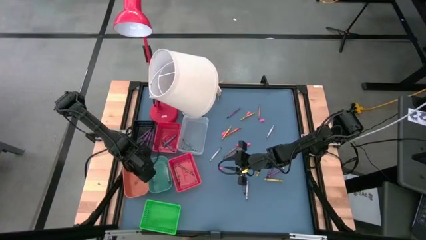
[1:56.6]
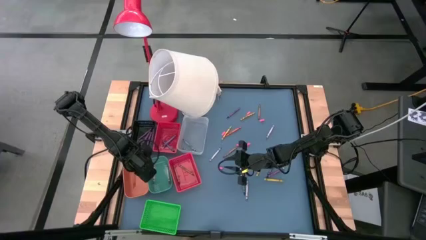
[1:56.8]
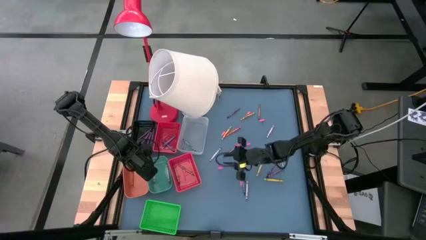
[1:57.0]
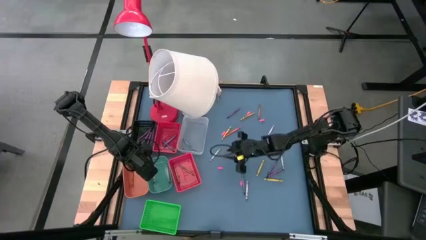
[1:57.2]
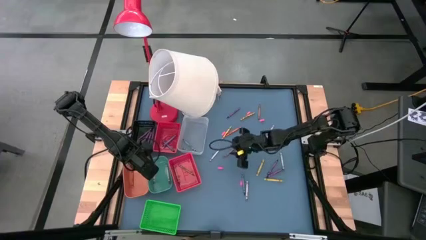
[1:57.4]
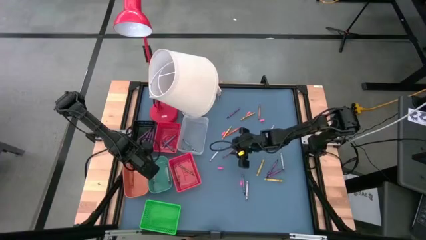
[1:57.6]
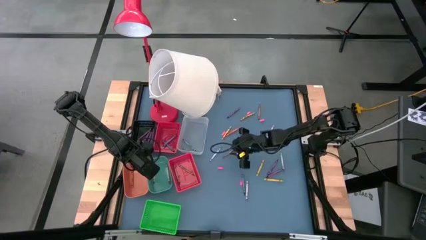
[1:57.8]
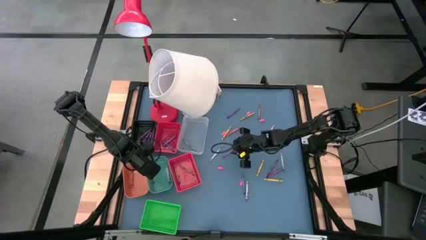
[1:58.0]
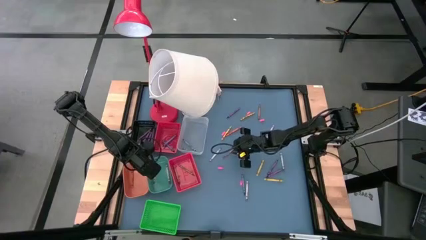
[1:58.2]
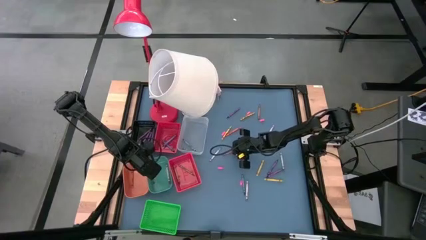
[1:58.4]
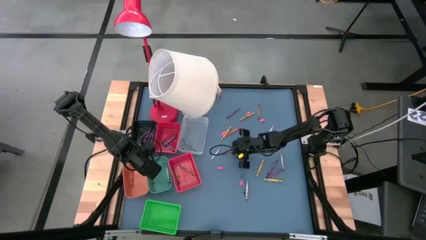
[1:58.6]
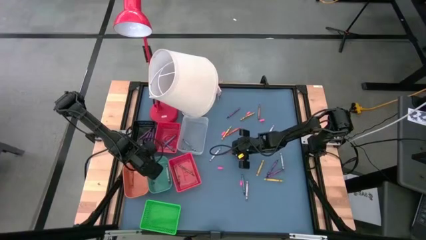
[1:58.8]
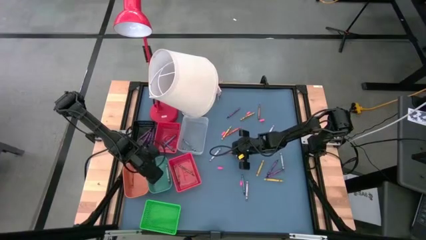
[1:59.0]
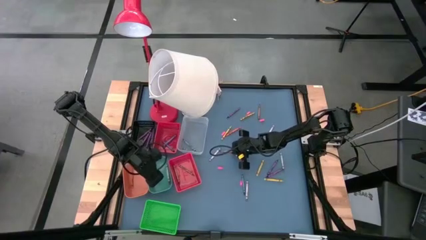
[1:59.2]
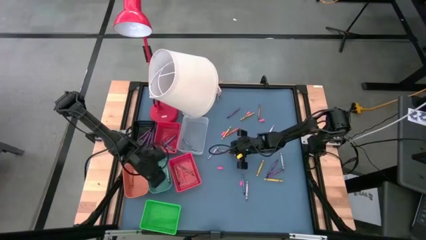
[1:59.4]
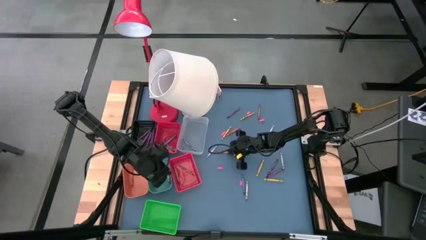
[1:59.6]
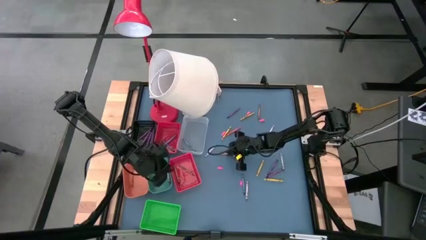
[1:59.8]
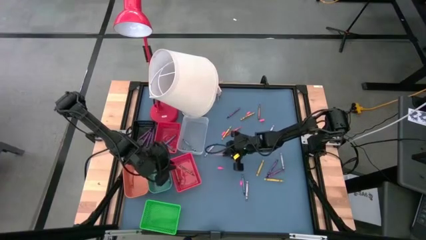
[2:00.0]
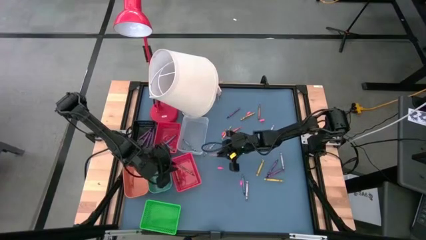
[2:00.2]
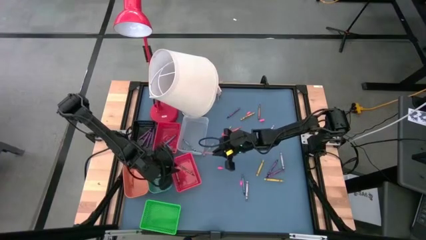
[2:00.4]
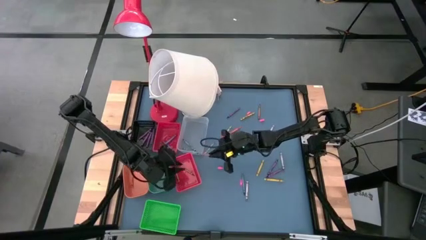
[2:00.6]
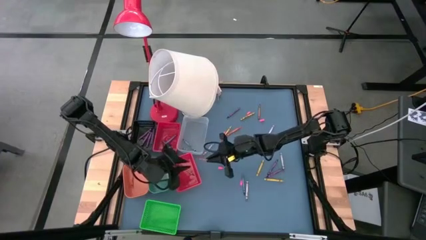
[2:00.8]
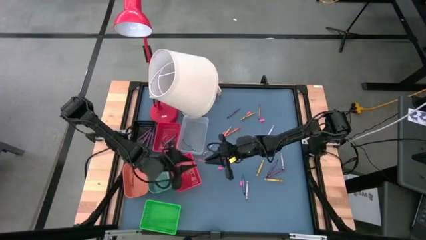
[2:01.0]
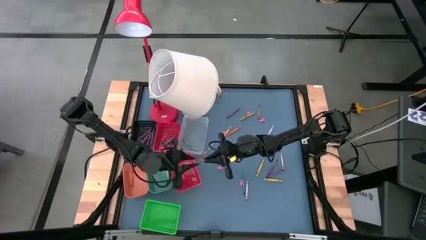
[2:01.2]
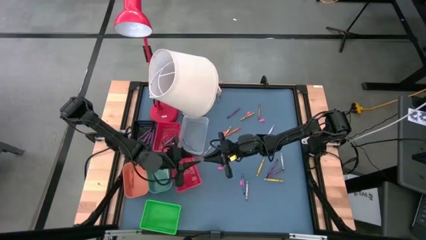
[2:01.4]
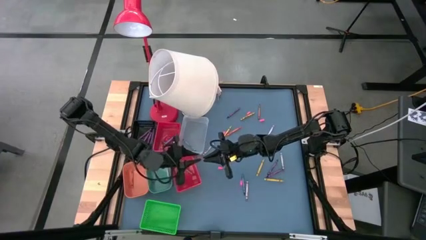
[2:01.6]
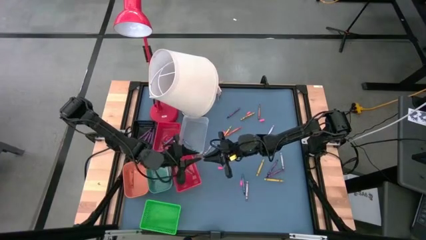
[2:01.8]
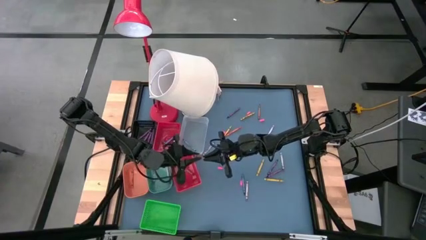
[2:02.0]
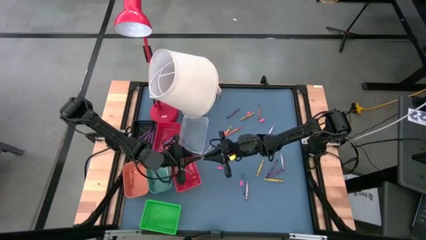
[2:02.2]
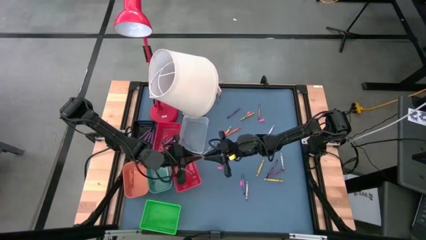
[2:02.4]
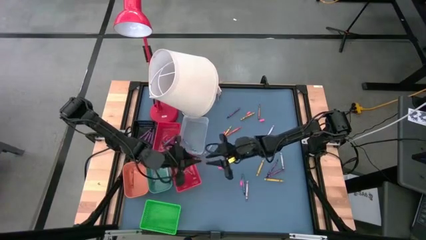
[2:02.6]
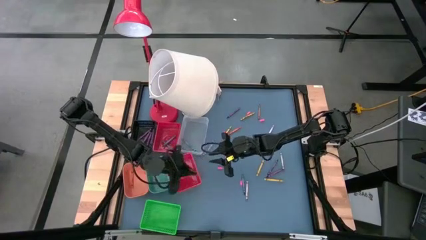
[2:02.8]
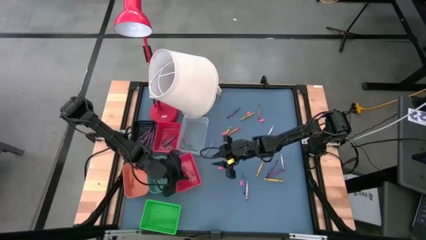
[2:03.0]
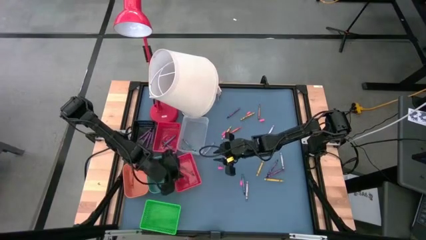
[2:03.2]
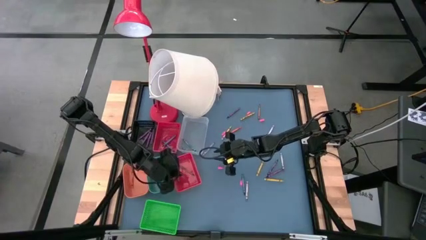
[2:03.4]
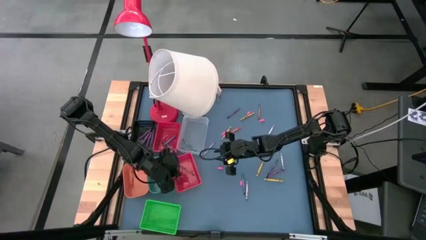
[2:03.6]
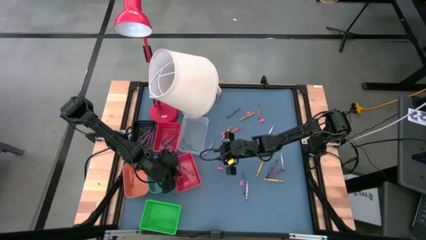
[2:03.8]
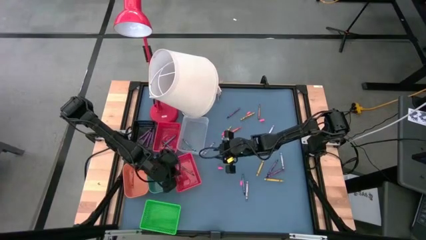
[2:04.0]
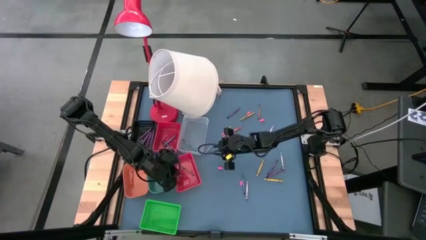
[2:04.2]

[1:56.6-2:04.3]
Task: Sort crayons
Put the brown crayon into the bottom red bin

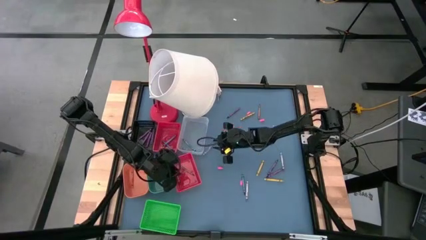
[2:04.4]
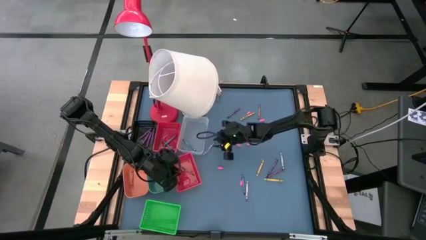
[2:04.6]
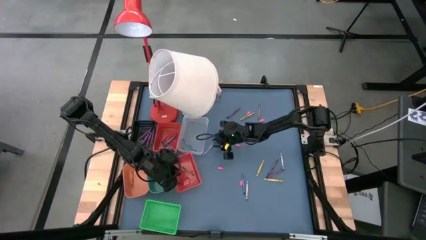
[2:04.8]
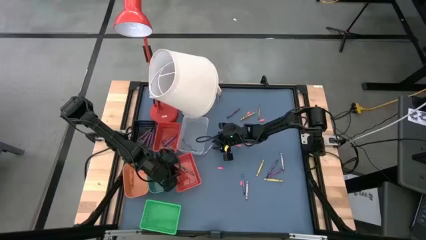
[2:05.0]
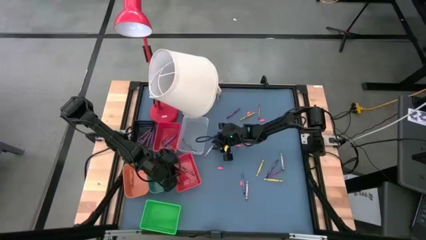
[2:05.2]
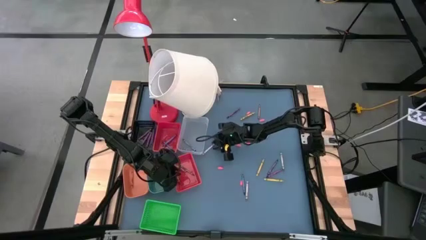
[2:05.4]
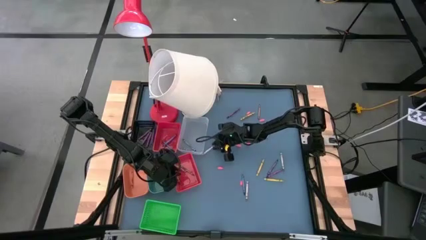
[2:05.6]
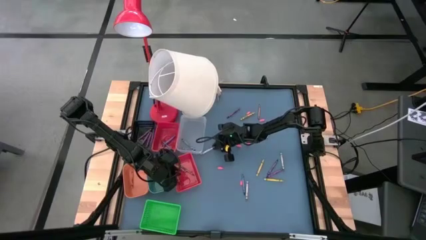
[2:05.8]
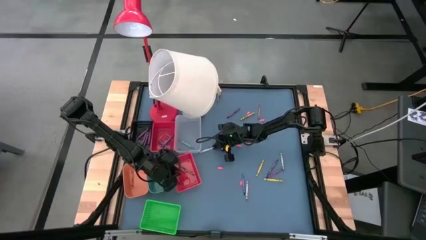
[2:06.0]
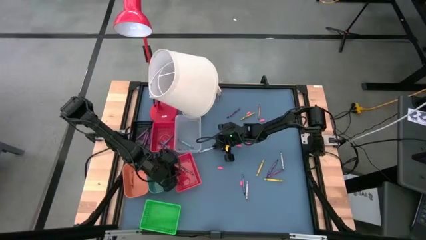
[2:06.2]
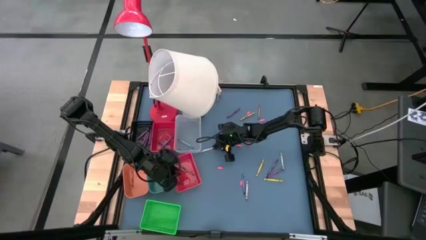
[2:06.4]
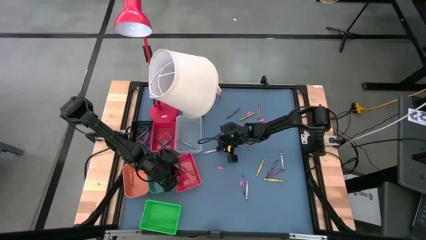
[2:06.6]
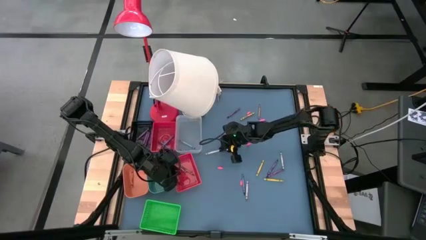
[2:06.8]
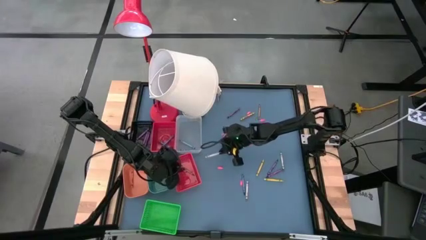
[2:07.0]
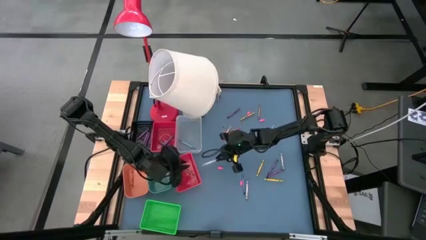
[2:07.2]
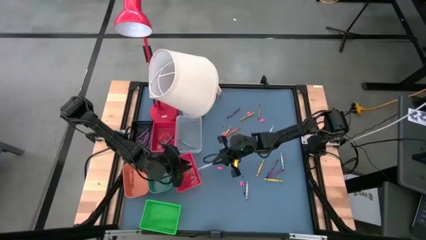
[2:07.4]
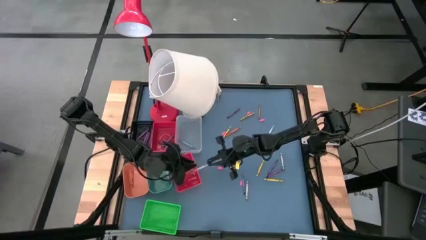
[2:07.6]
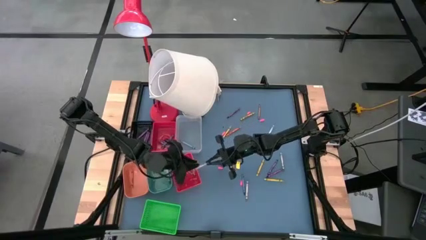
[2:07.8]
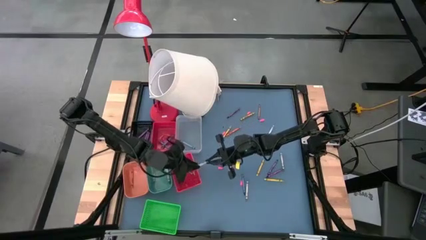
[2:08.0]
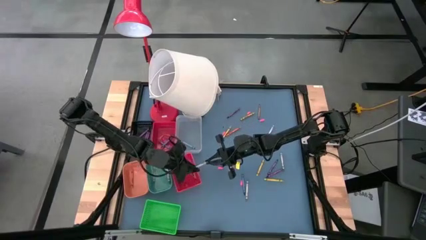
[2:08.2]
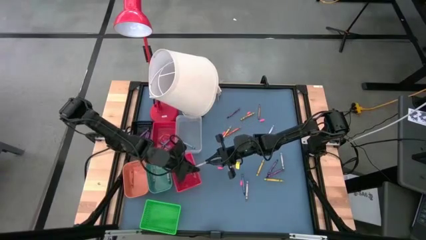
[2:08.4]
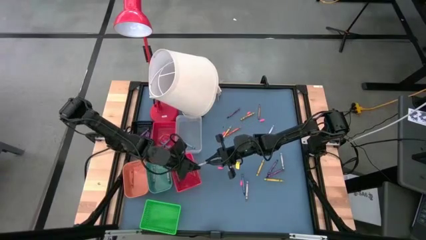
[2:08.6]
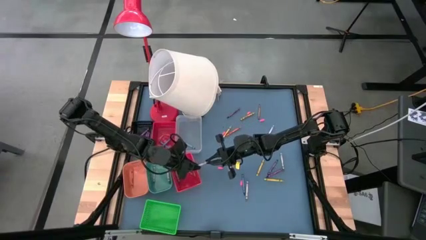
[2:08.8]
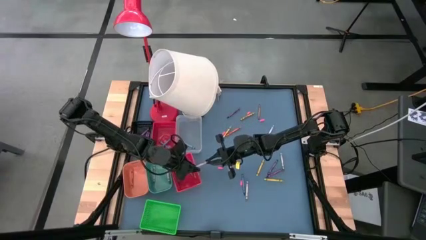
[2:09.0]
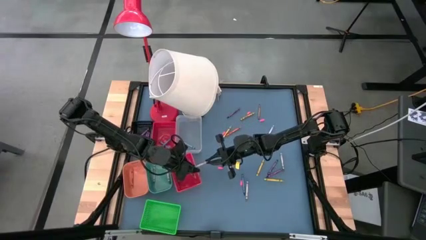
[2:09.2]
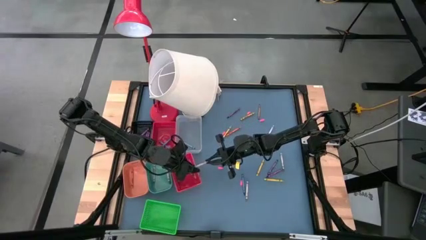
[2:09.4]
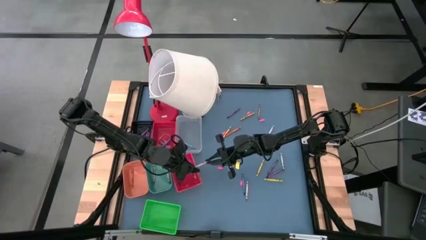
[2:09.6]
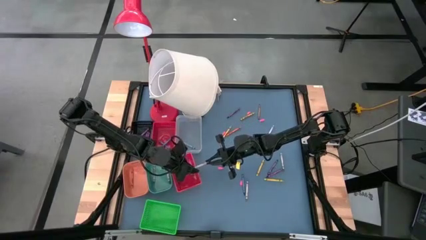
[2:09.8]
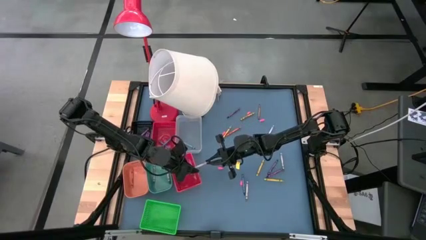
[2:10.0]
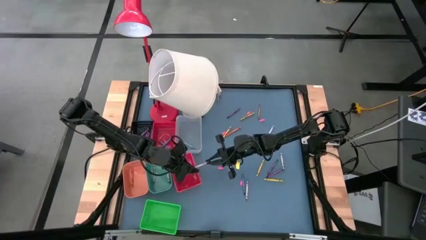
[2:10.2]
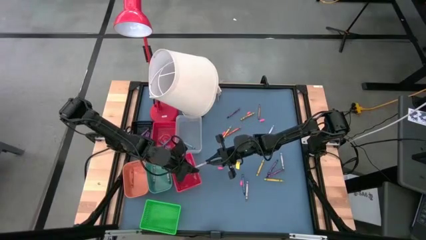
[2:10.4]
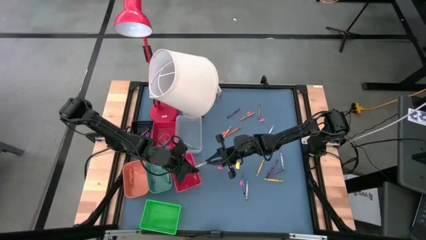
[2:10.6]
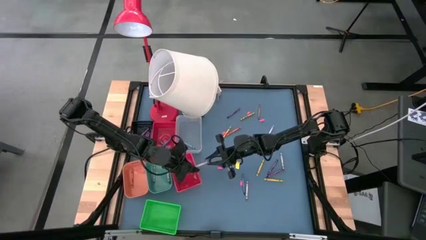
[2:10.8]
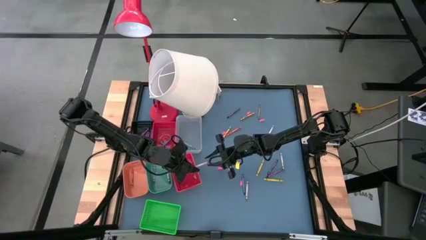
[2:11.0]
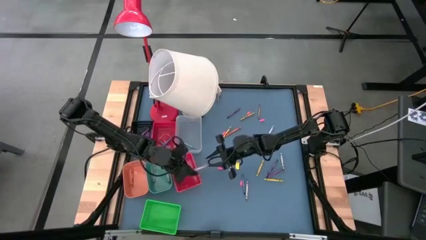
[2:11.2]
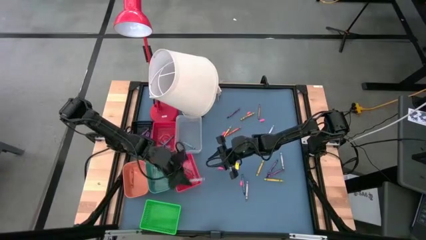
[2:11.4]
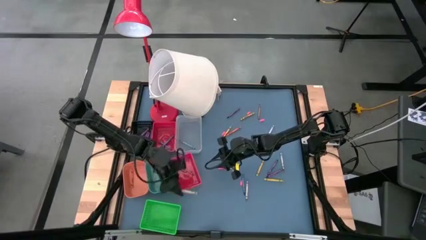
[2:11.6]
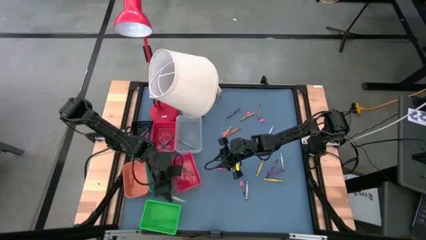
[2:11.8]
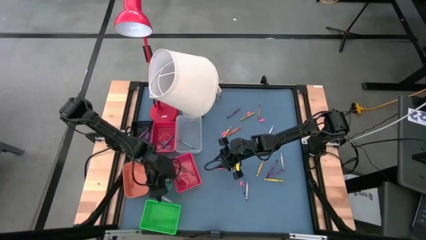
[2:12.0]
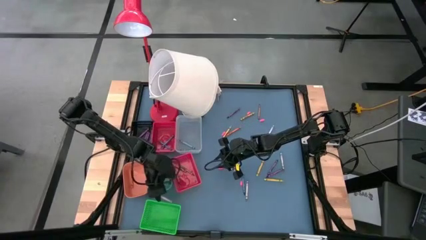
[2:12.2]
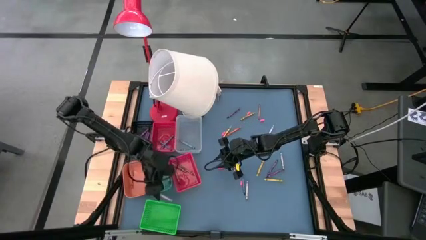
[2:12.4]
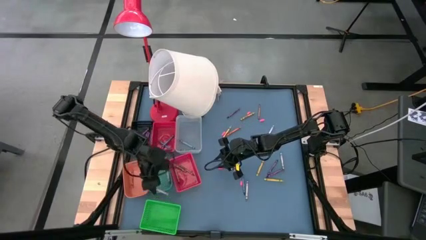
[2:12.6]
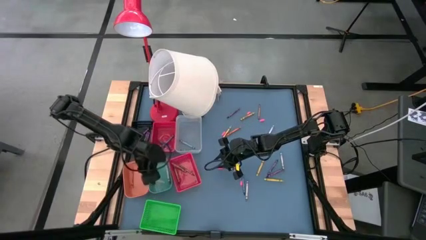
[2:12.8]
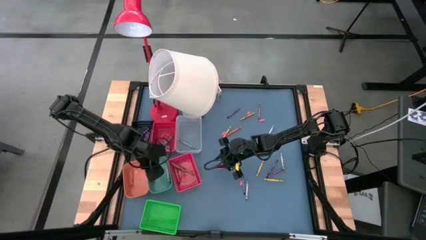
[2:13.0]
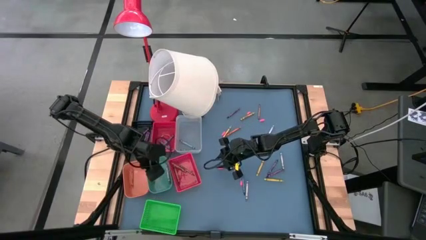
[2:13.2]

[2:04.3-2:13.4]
Put the gray crayon into the green bin
